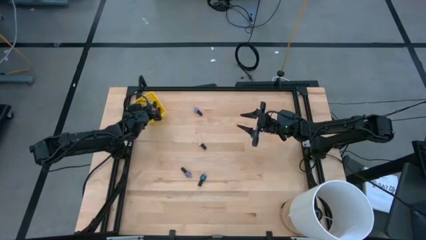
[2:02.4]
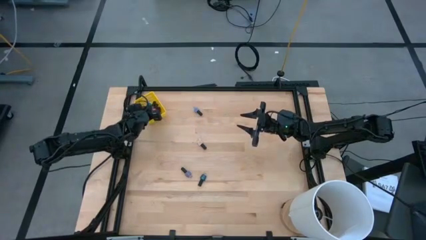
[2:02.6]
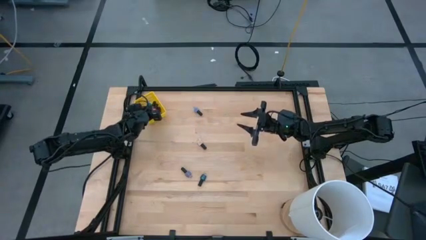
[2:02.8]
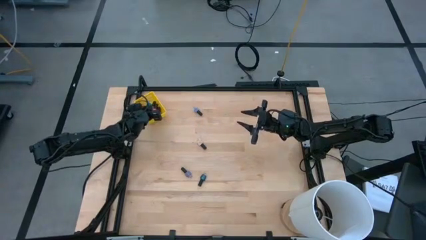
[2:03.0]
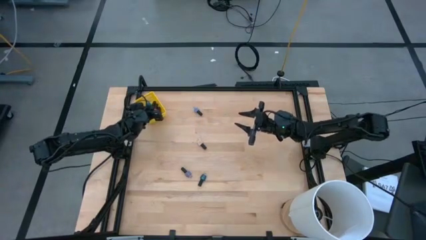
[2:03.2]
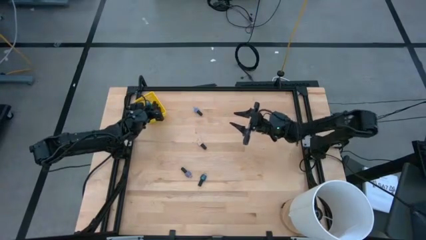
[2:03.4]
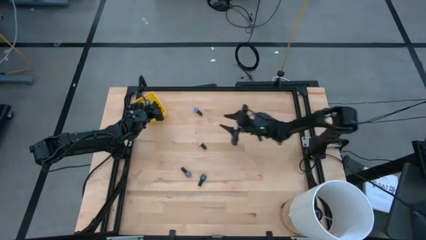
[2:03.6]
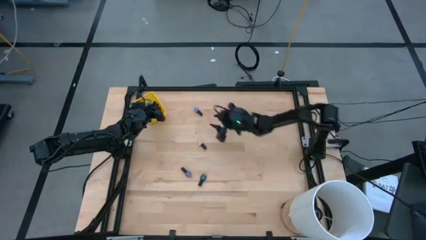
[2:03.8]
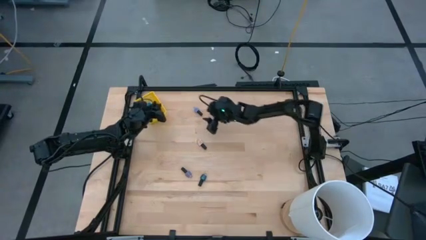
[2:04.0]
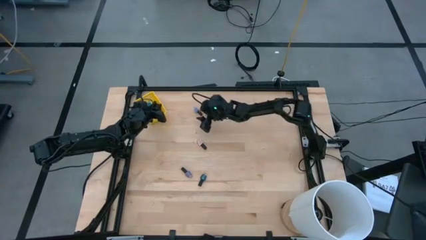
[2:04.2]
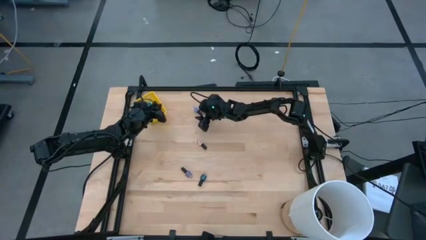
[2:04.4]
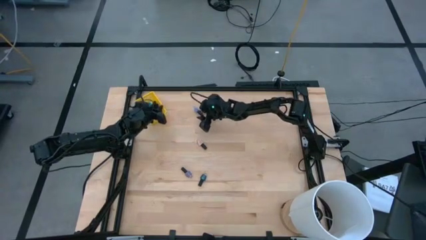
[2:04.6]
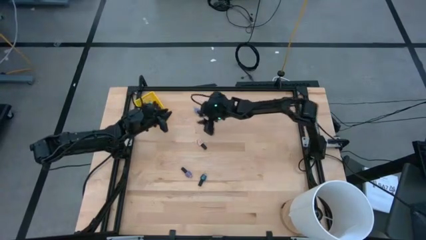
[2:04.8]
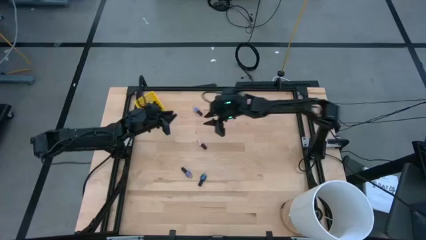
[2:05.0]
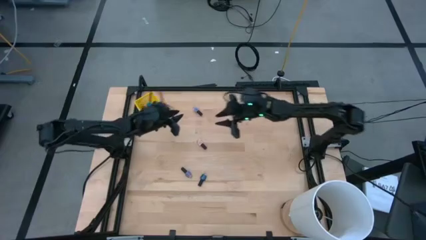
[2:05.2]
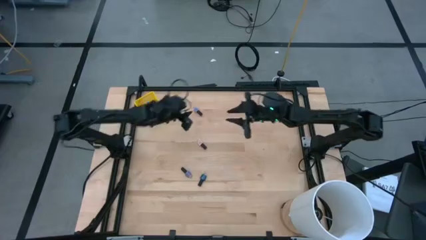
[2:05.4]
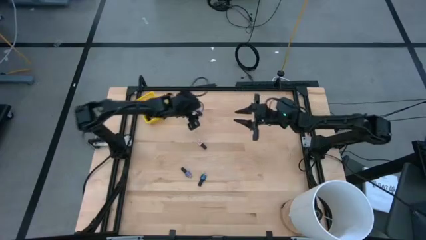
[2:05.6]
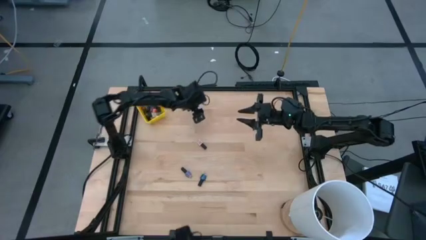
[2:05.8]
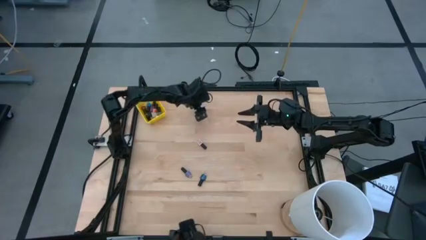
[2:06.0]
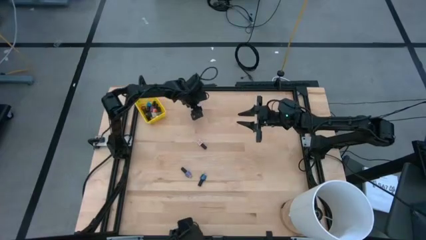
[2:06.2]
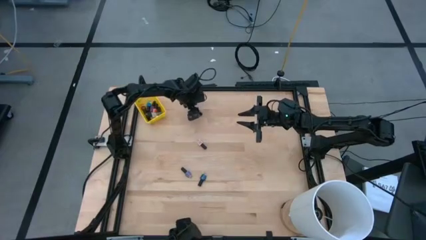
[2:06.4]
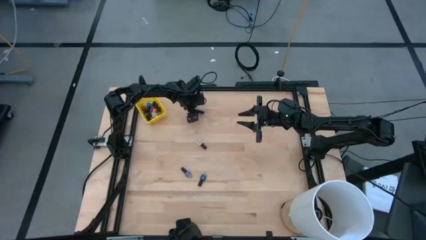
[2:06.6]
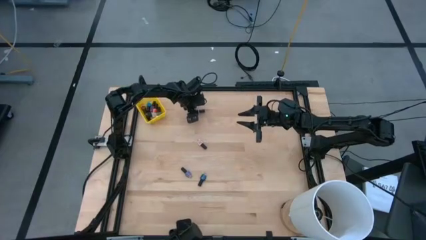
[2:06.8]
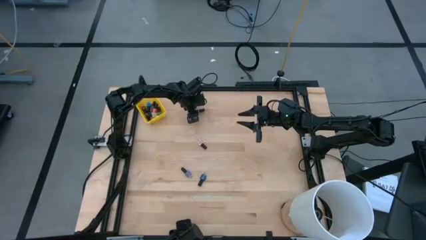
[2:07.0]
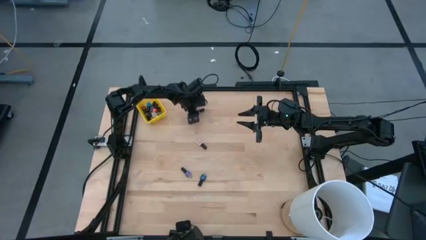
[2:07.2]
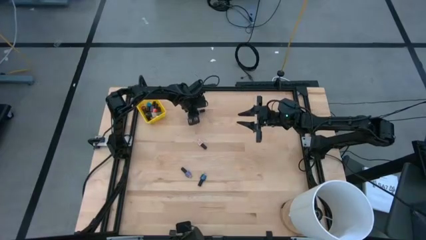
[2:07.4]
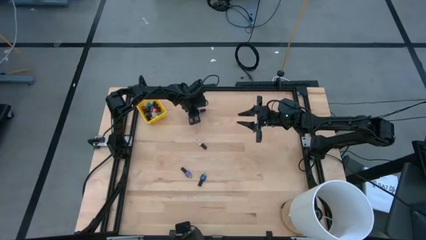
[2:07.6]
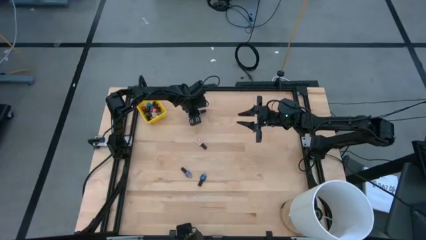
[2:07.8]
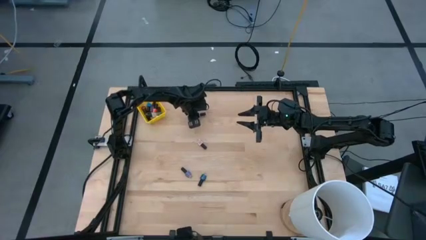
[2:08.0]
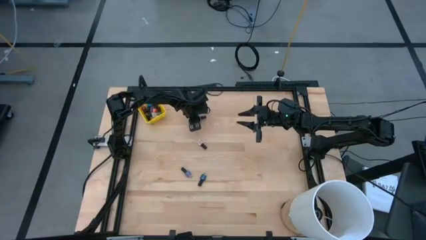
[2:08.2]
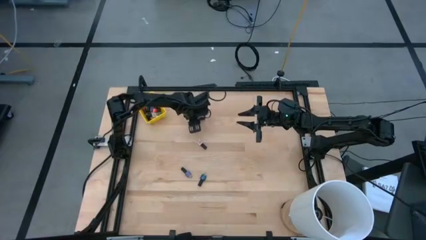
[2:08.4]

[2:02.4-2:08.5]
Task: Pick & Place Nail Polish
Put the light blue nail polish into the yellow bin

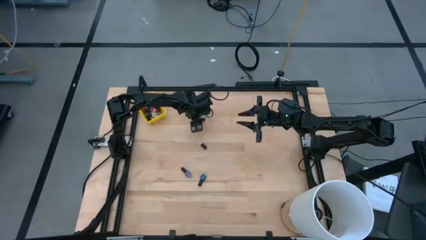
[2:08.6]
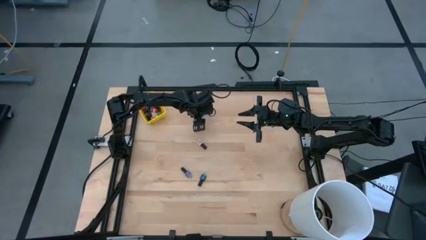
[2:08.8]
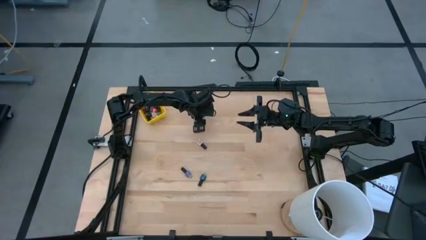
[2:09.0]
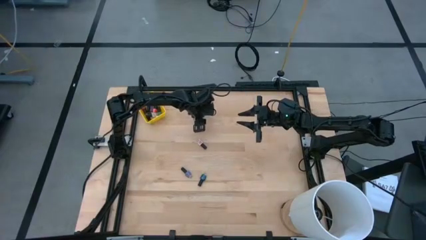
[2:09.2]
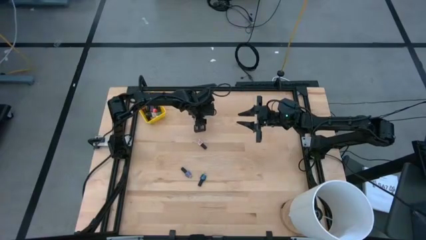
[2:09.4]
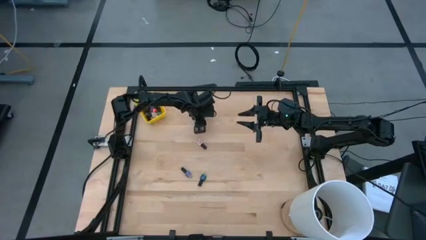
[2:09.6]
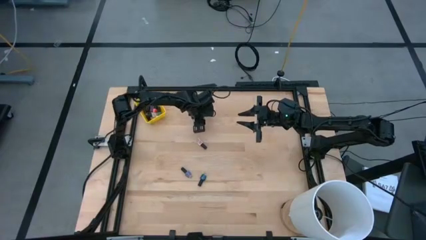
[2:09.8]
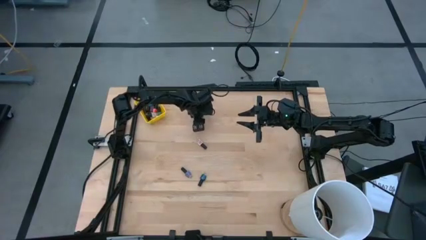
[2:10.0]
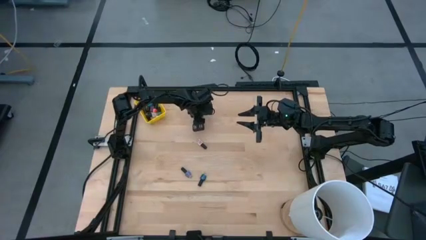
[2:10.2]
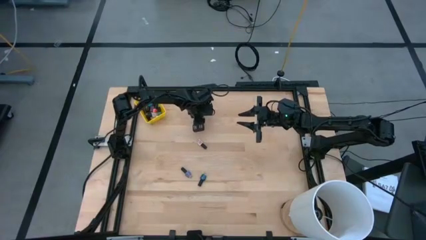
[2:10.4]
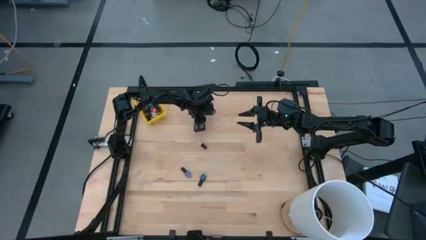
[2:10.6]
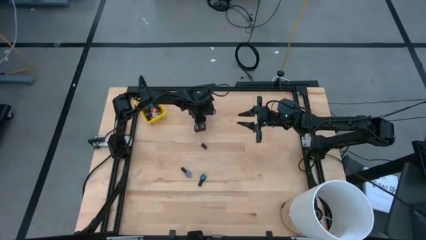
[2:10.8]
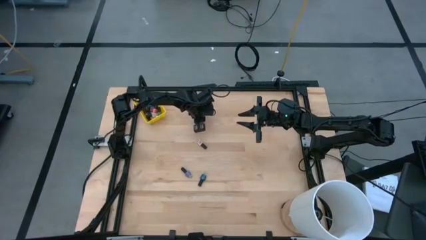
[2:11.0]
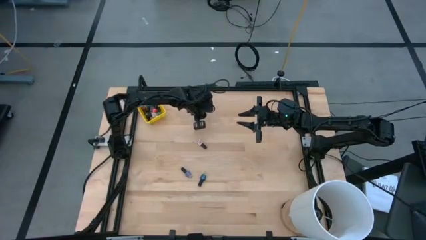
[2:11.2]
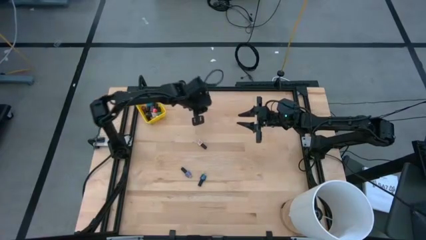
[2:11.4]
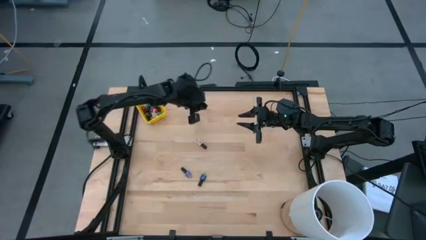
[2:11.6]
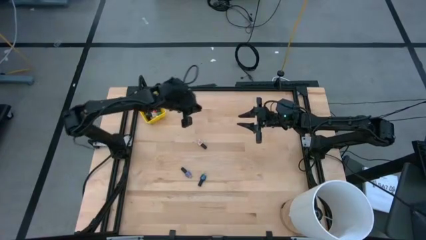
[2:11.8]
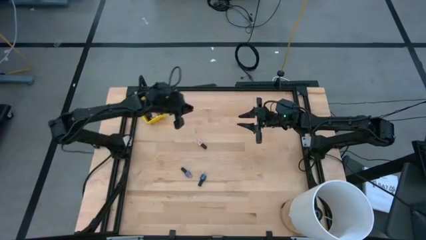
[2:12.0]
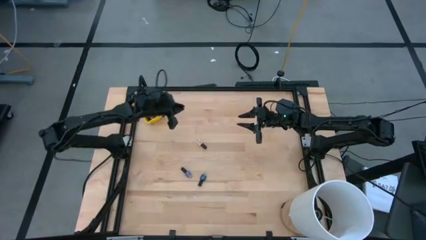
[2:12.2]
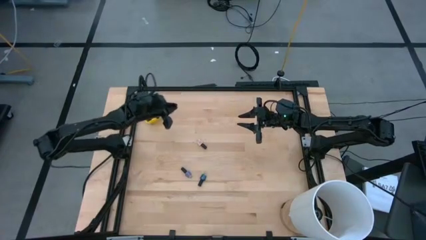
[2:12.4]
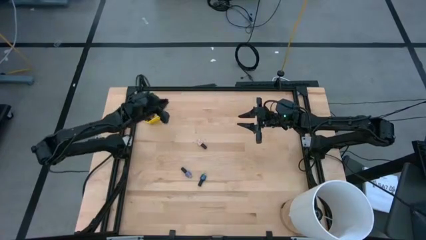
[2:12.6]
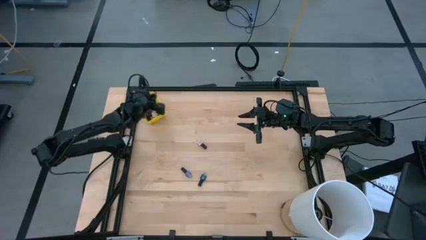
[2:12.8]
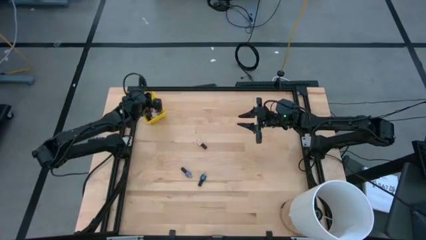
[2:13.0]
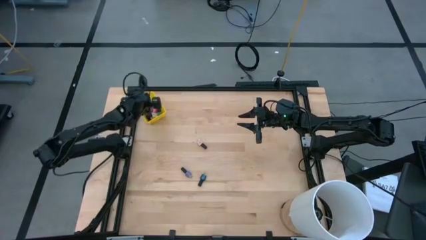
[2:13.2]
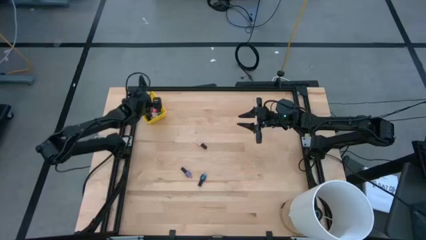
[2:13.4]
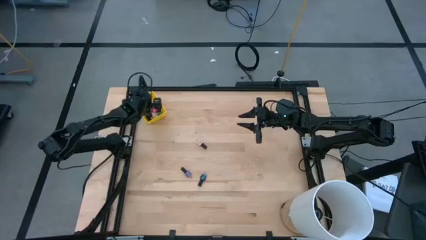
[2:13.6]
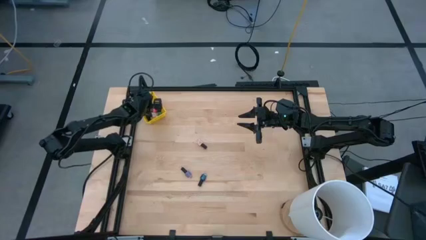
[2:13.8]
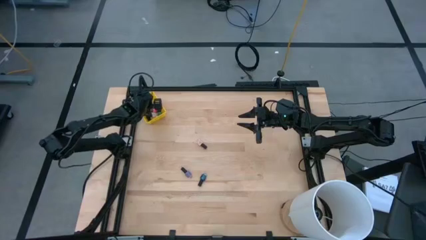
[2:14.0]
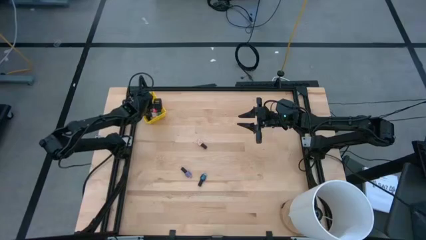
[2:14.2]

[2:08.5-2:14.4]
Put the light blue nail polish into the yellow bin

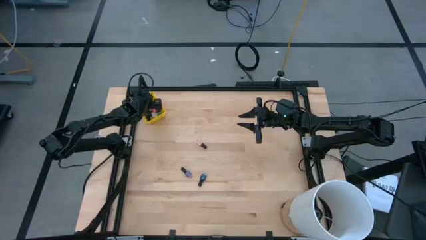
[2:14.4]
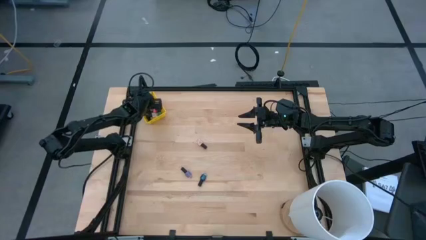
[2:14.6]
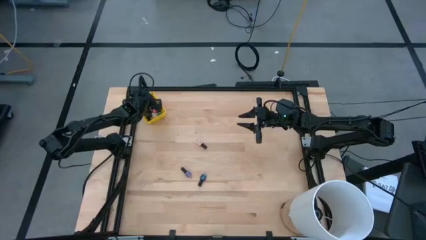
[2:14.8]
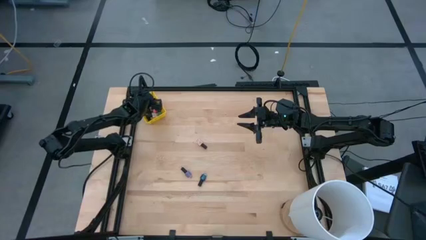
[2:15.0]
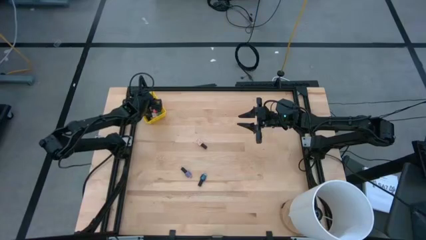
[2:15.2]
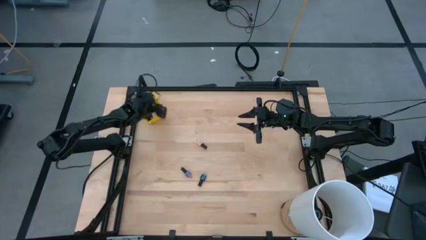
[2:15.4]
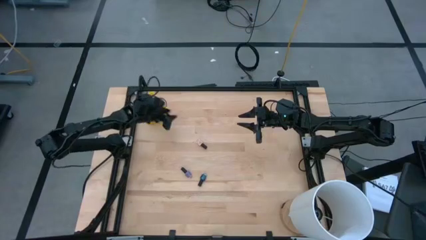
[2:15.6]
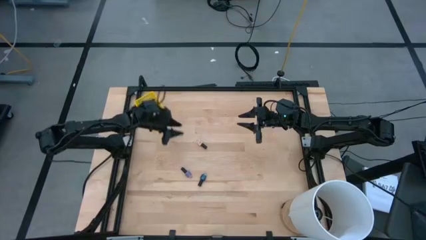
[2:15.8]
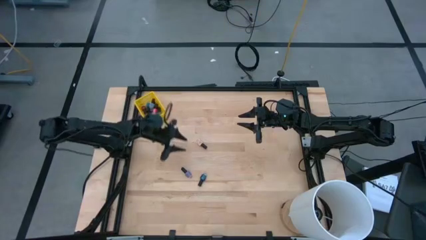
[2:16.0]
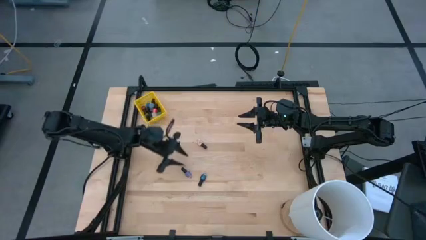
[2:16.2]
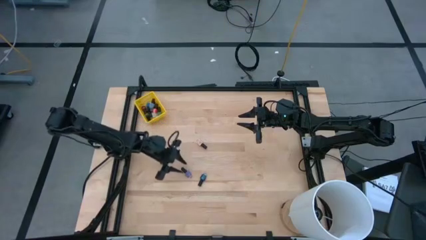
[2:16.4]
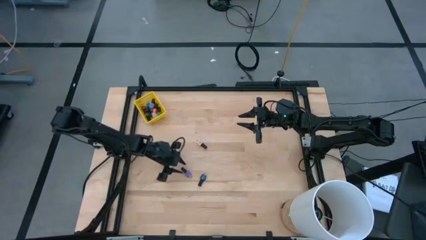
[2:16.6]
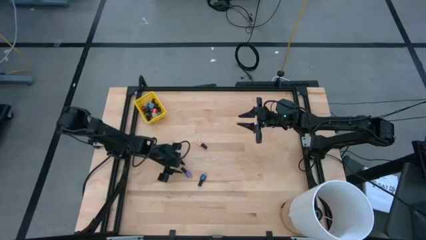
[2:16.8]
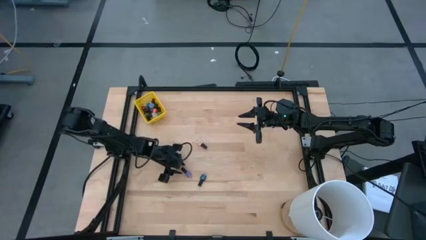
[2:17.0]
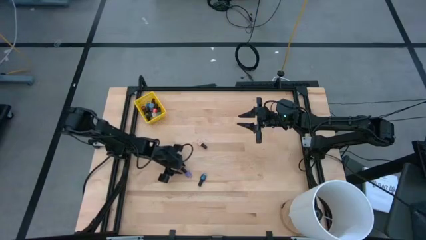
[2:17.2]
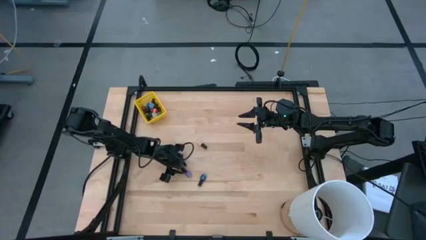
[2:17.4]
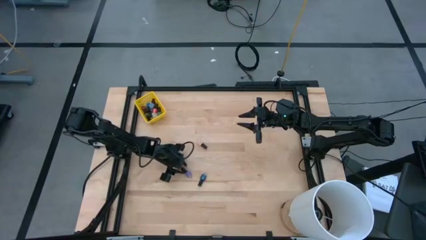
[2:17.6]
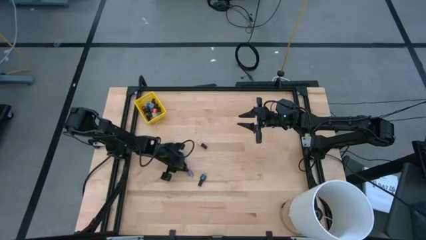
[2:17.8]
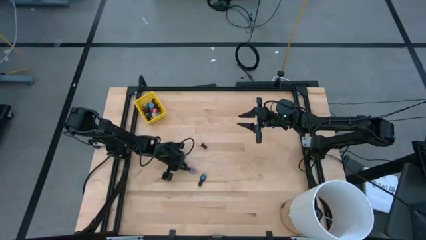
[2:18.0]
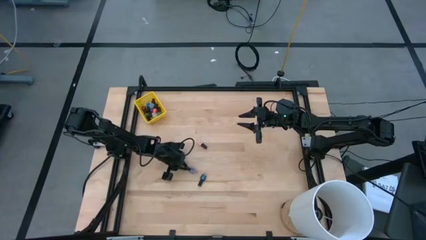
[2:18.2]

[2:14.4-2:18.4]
Put the purple nail polish into the yellow bin
